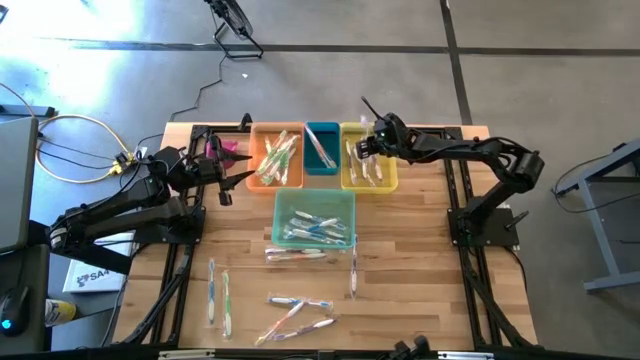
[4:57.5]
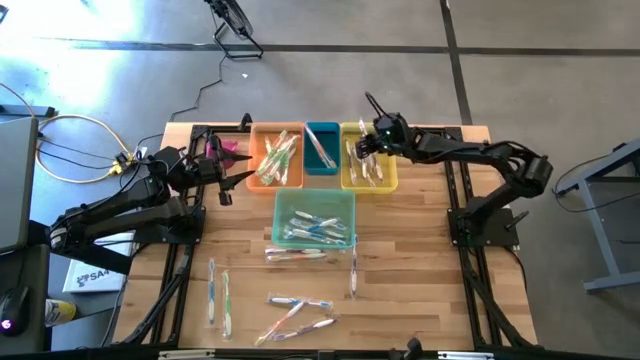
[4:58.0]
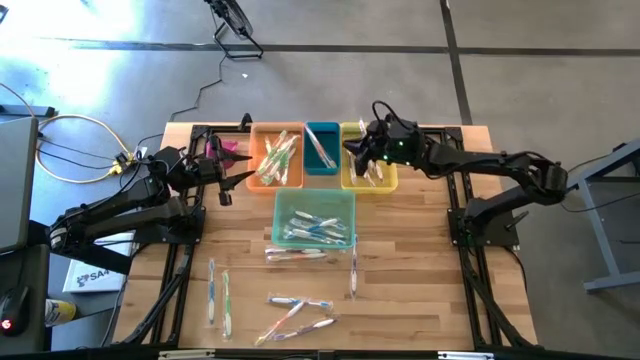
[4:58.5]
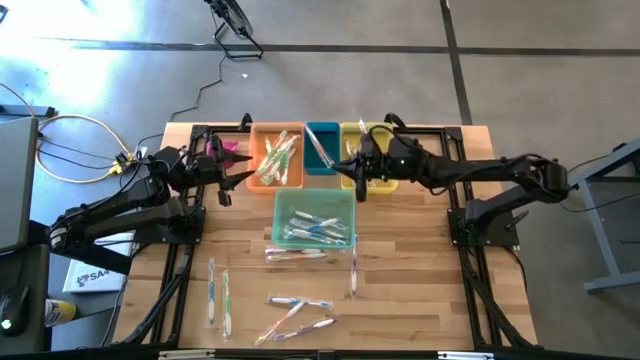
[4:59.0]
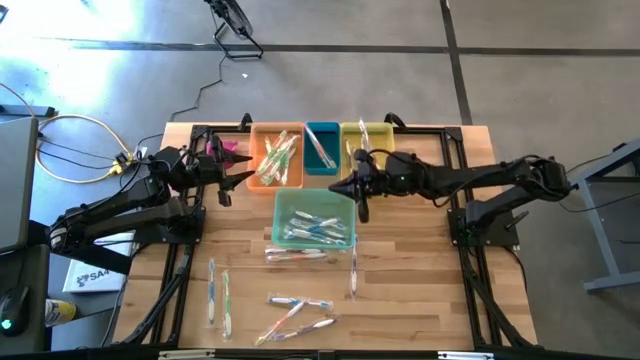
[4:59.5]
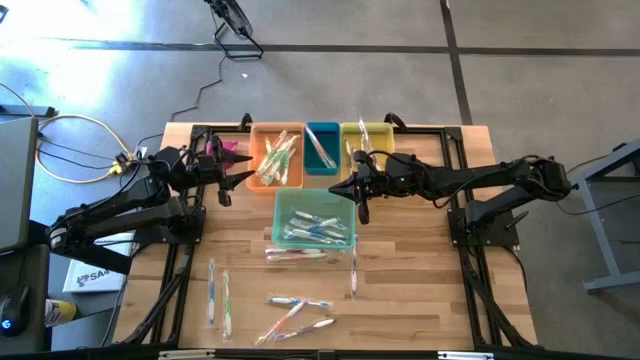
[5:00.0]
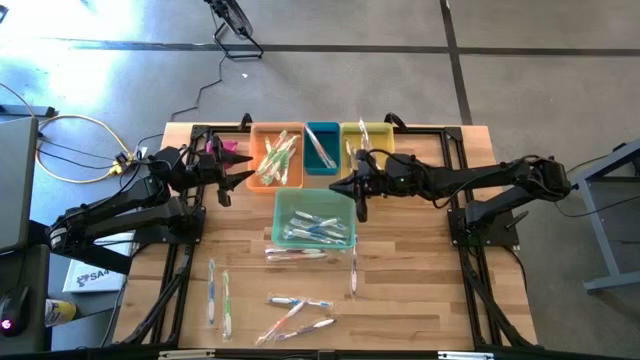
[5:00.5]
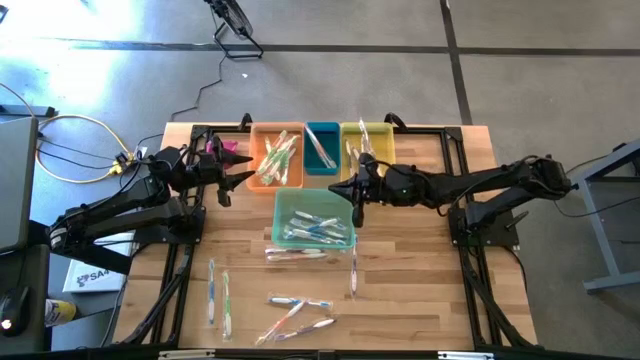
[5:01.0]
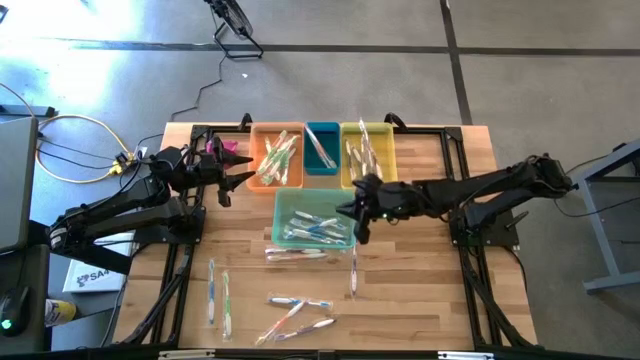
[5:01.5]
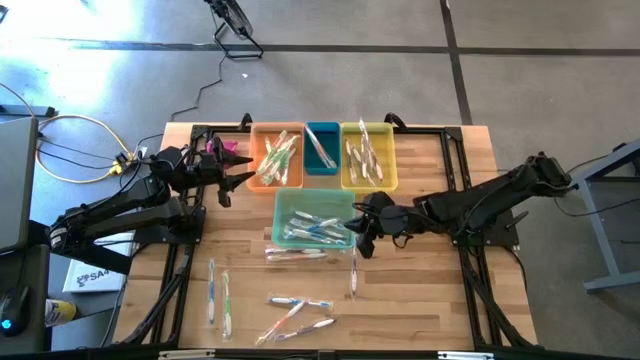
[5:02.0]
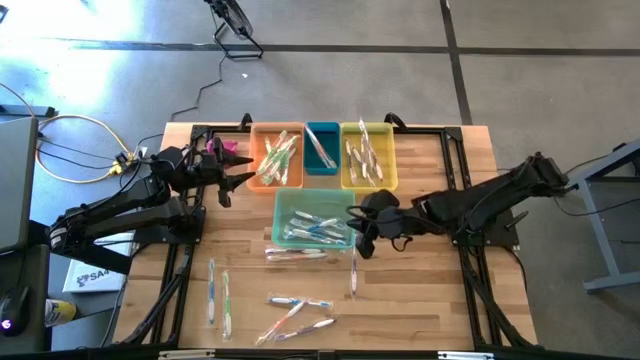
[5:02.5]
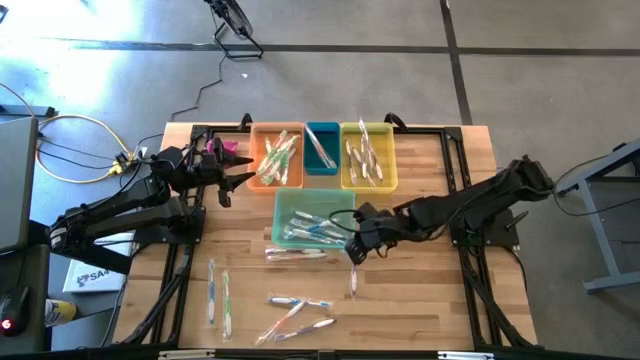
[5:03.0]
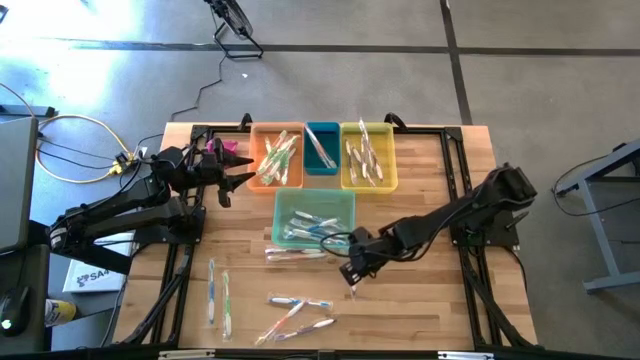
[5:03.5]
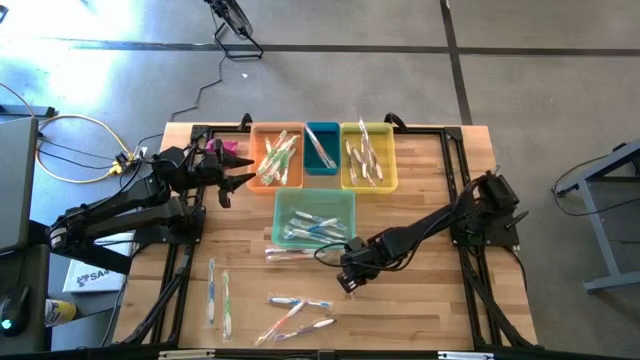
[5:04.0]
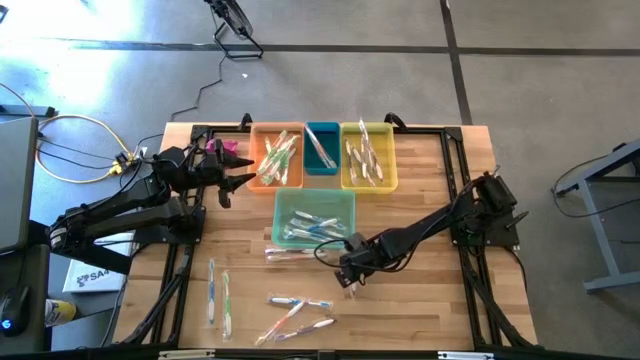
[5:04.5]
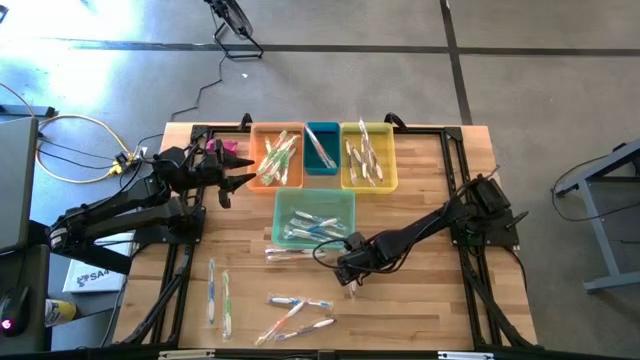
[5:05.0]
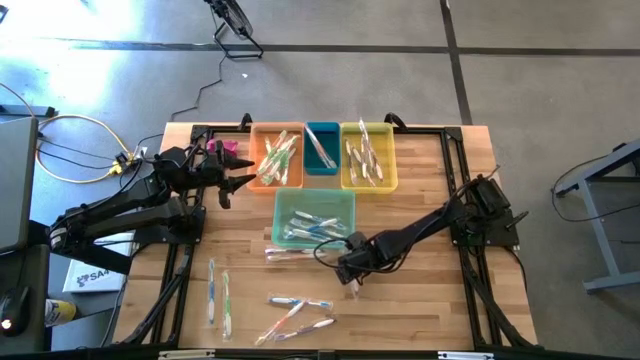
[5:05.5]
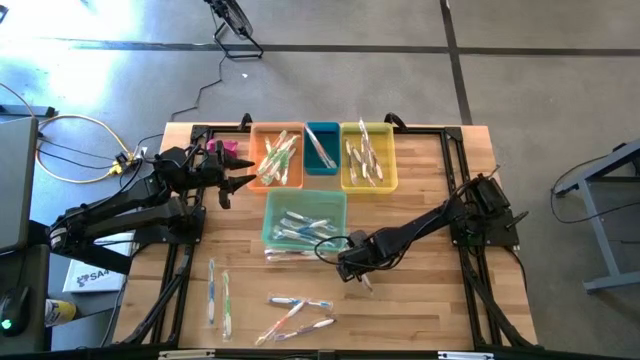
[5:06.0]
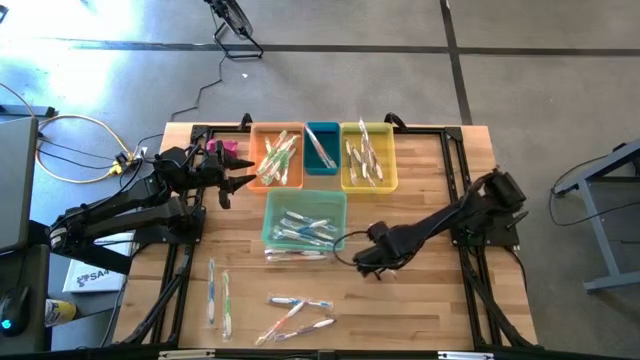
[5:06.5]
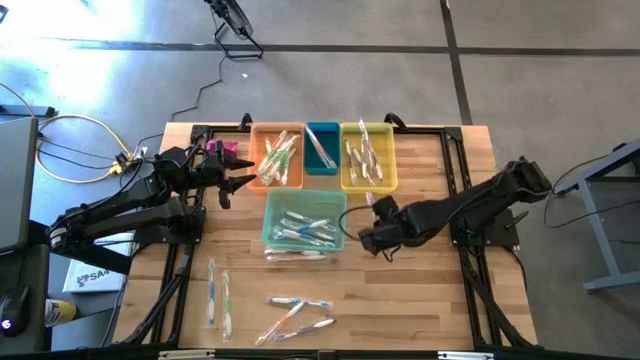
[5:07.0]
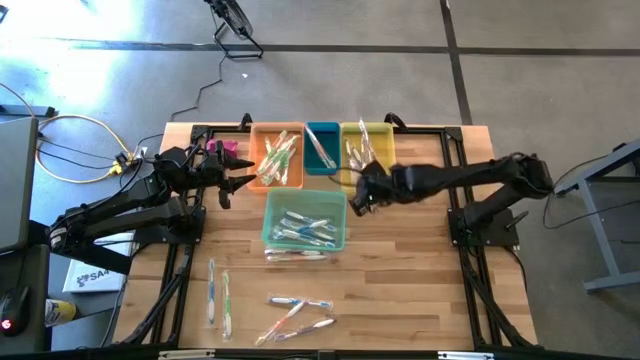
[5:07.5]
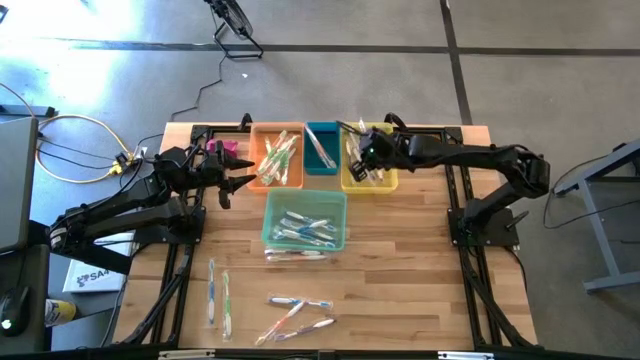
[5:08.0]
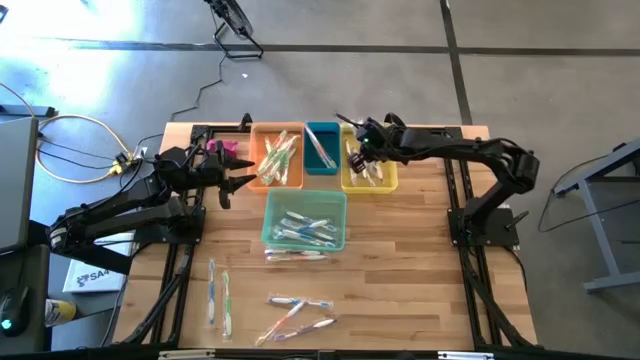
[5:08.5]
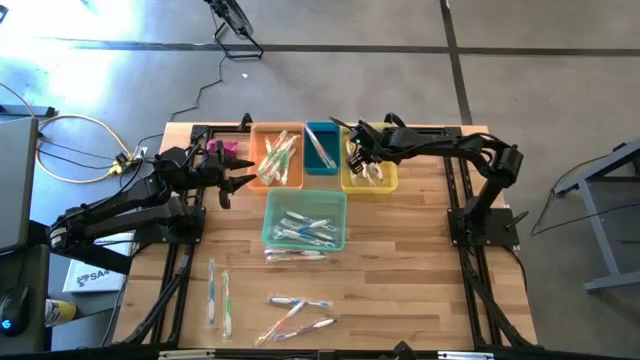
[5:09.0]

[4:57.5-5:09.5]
Task: Pick & Place Toothbrushes
Put the purple toothbrush into the yellow bin
